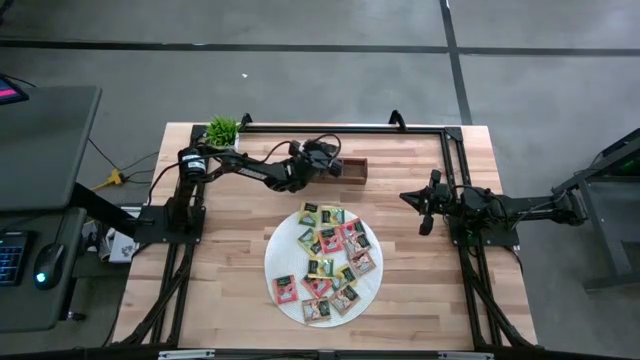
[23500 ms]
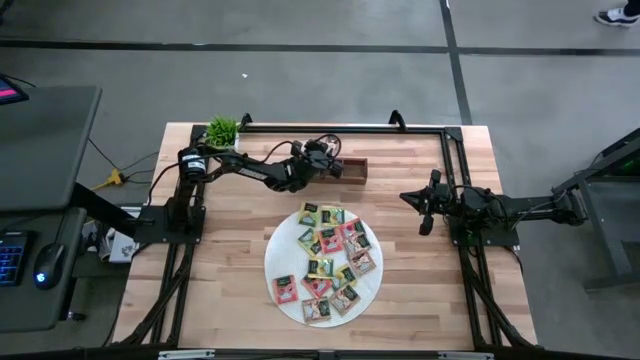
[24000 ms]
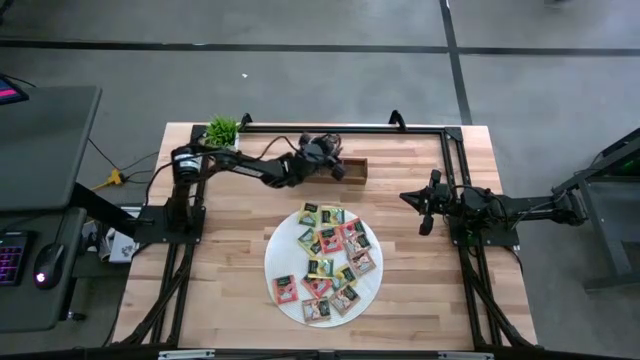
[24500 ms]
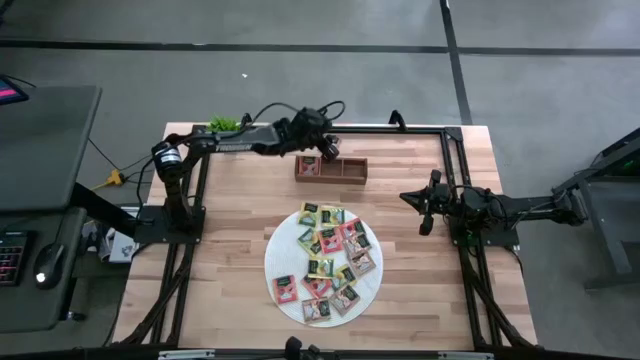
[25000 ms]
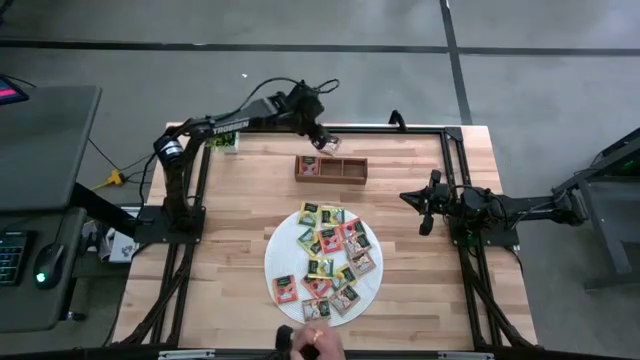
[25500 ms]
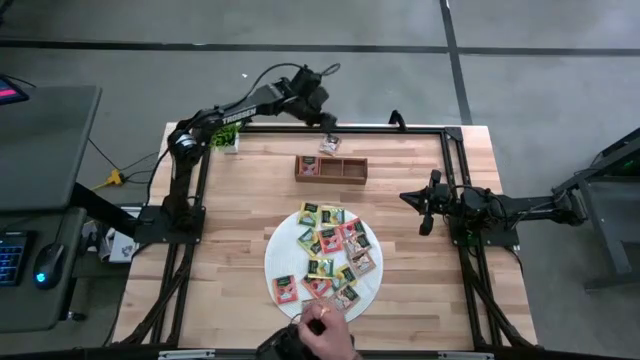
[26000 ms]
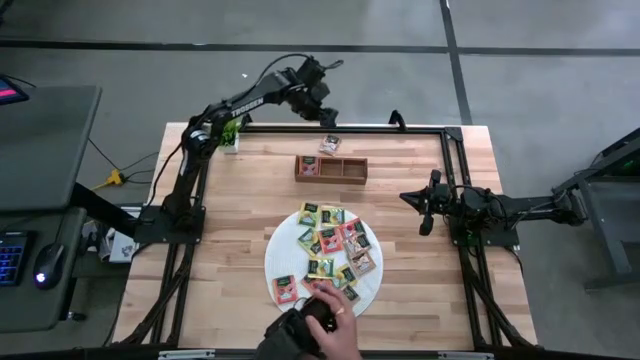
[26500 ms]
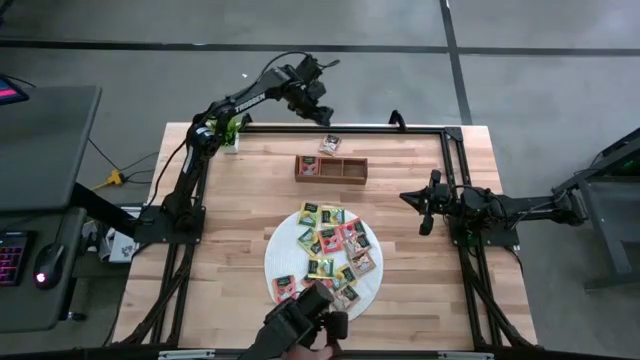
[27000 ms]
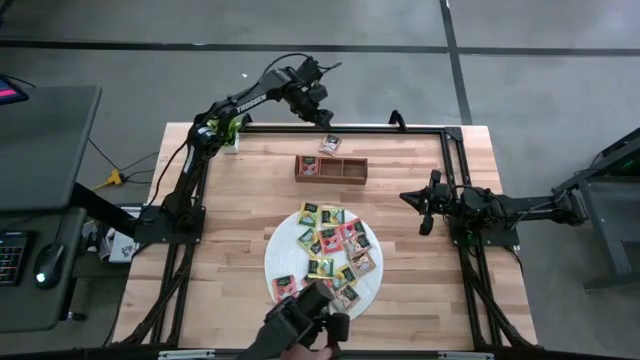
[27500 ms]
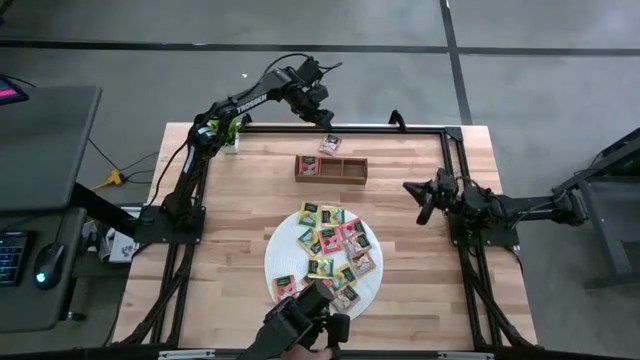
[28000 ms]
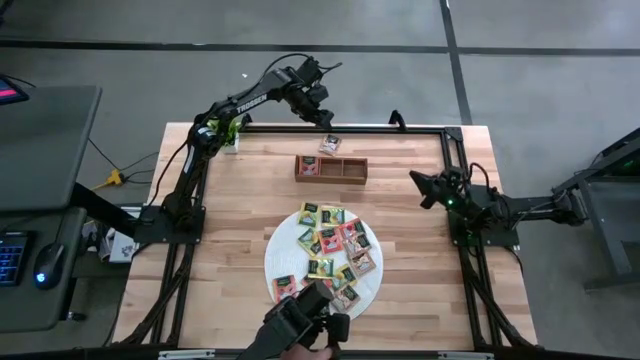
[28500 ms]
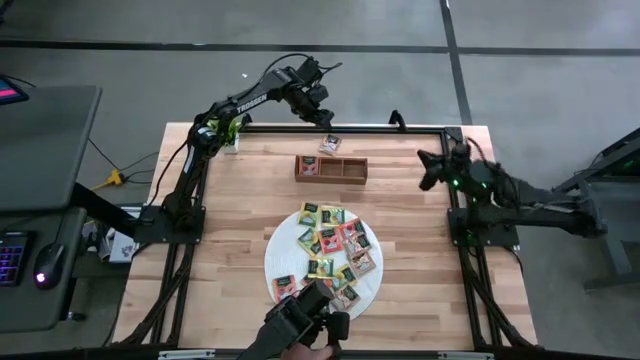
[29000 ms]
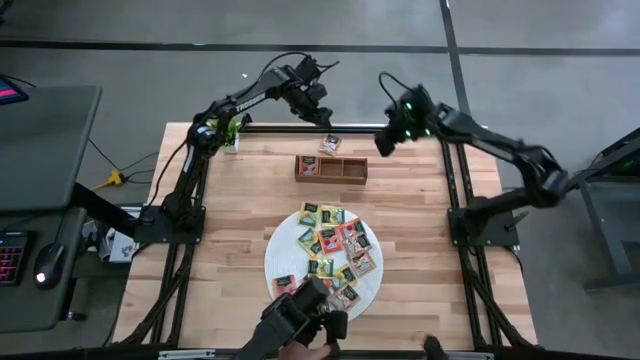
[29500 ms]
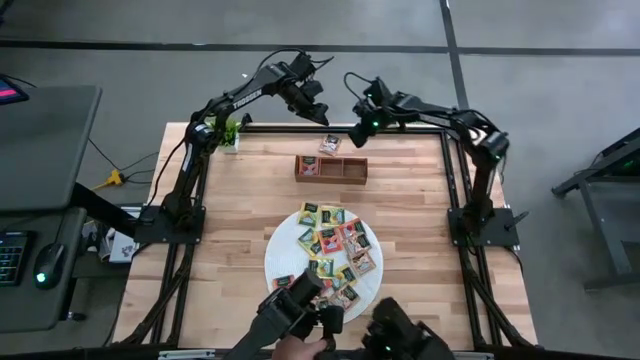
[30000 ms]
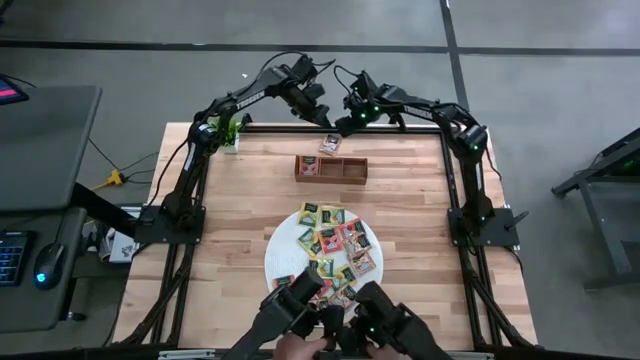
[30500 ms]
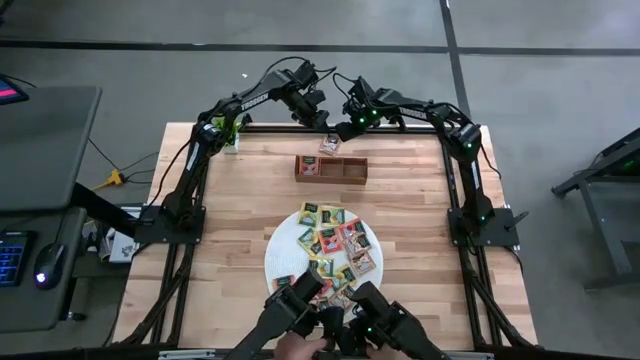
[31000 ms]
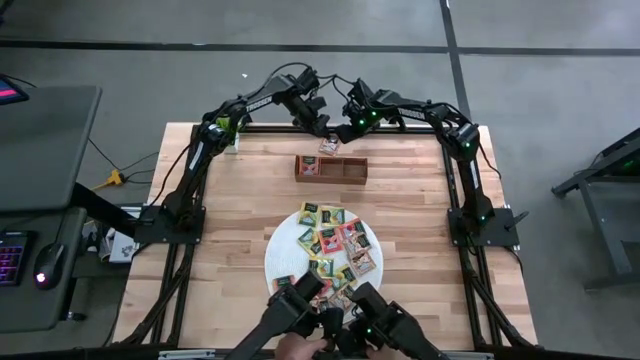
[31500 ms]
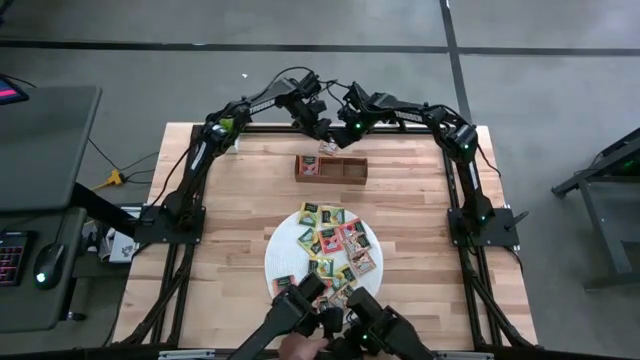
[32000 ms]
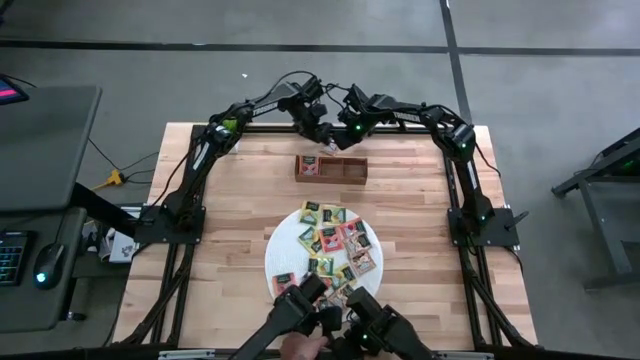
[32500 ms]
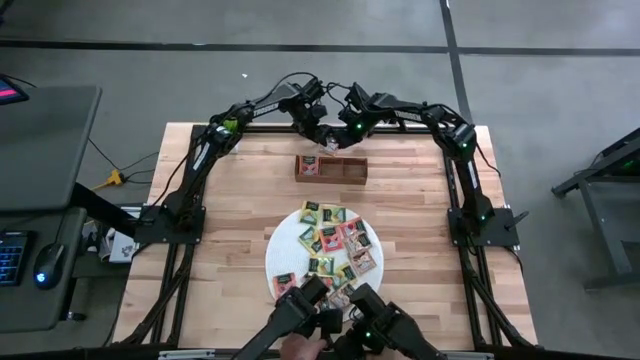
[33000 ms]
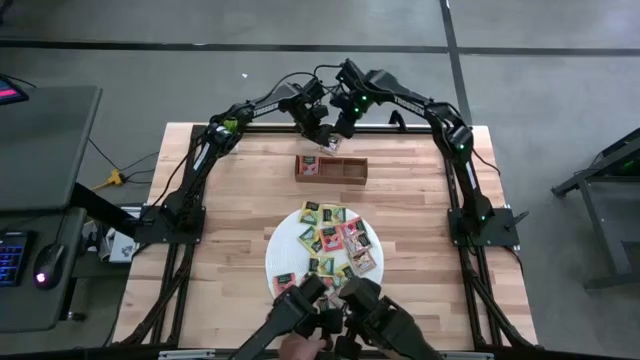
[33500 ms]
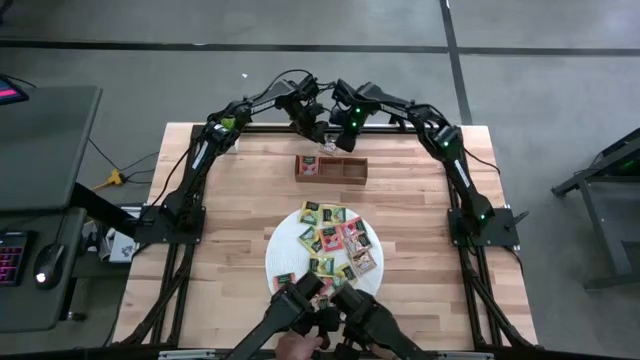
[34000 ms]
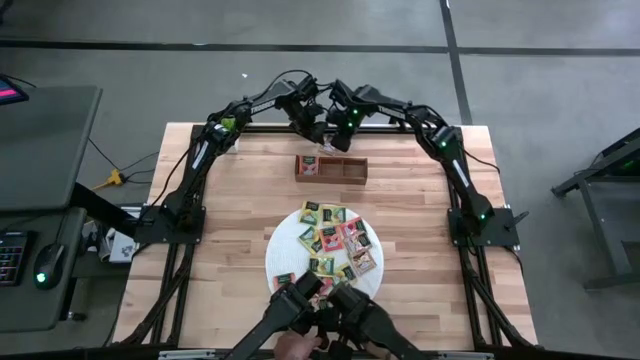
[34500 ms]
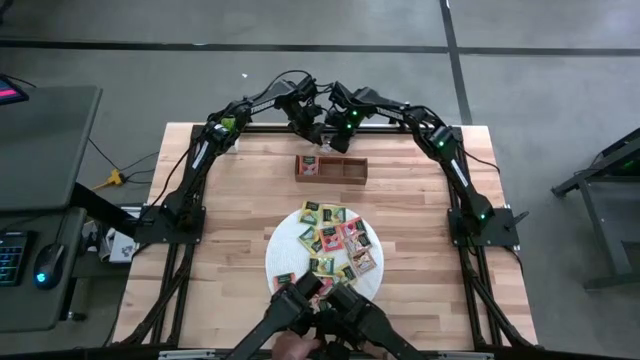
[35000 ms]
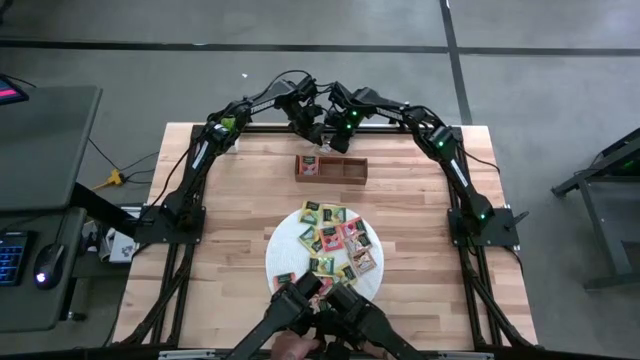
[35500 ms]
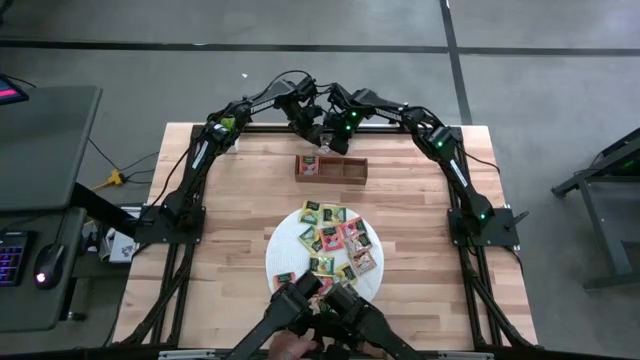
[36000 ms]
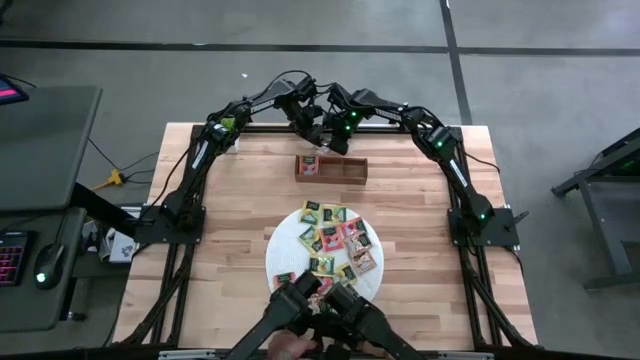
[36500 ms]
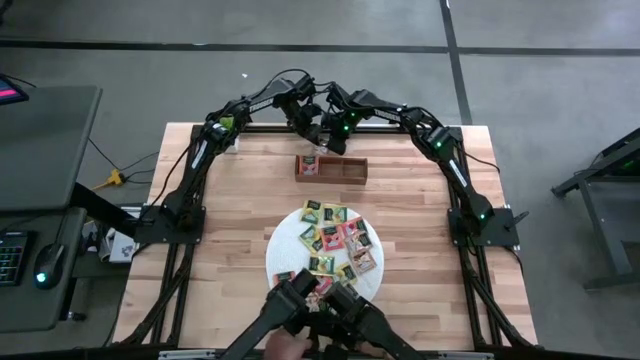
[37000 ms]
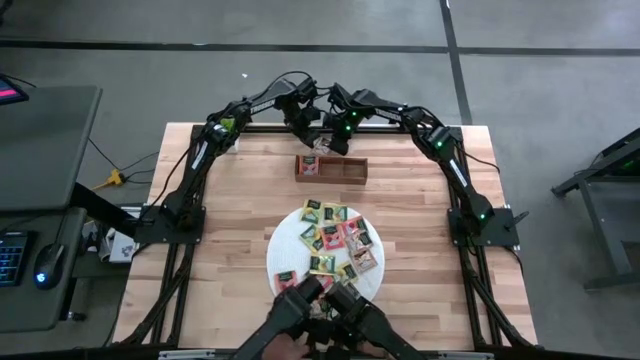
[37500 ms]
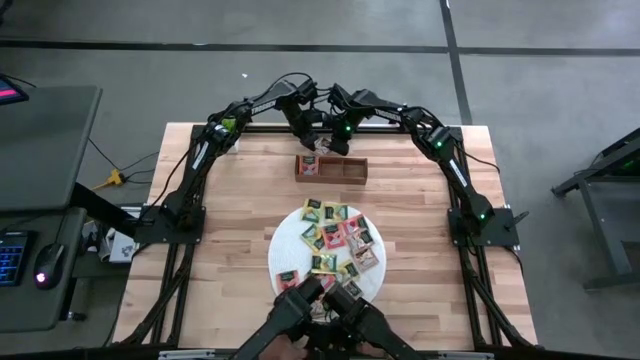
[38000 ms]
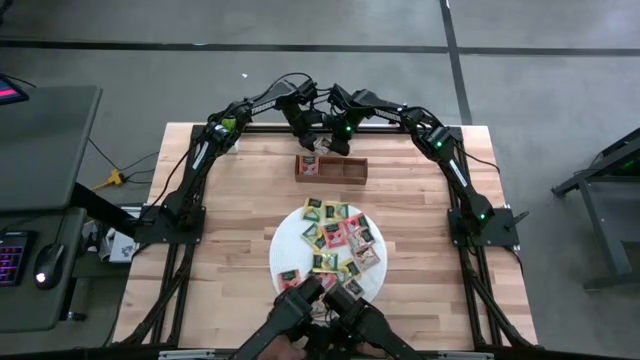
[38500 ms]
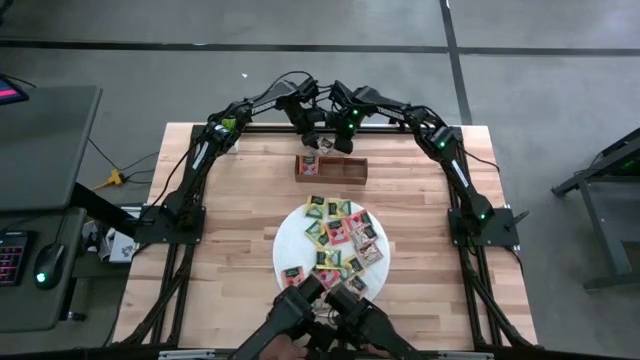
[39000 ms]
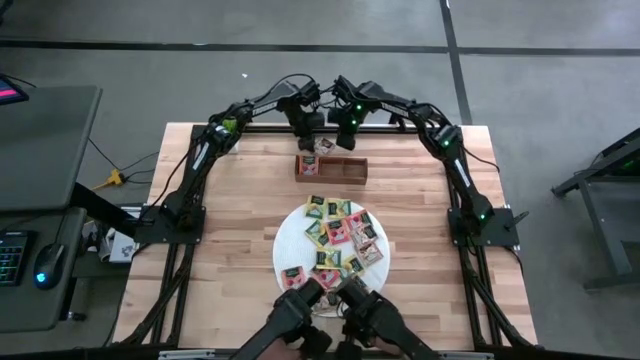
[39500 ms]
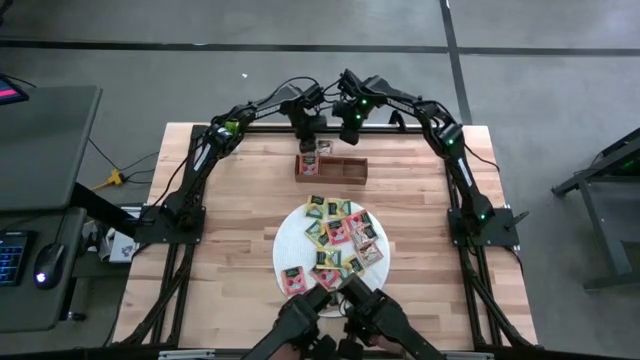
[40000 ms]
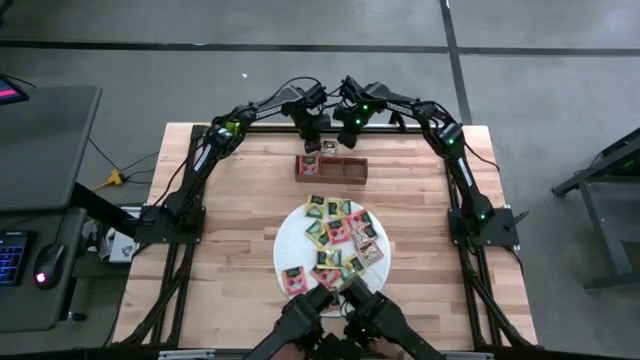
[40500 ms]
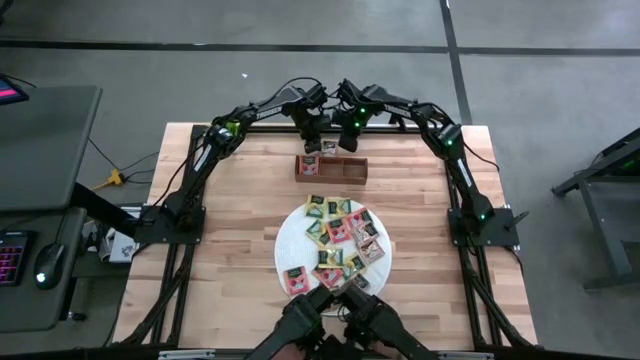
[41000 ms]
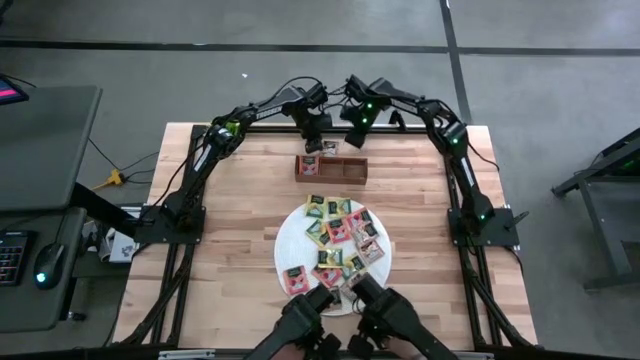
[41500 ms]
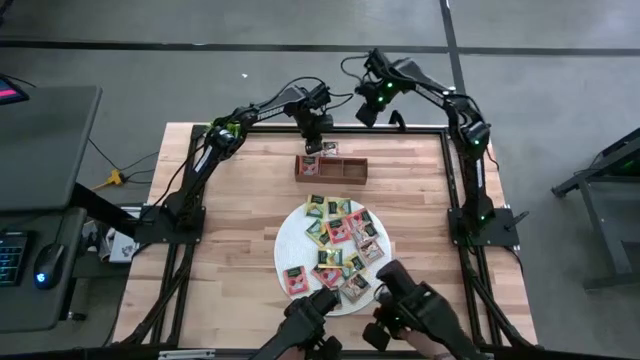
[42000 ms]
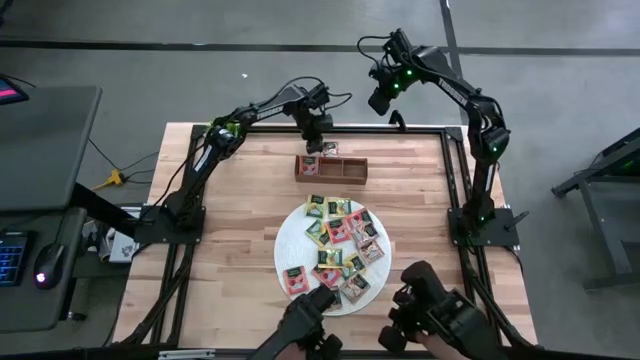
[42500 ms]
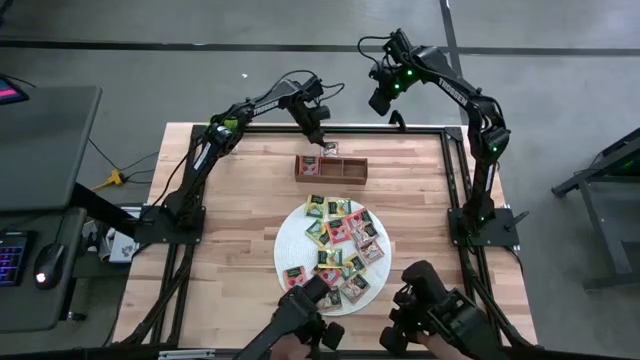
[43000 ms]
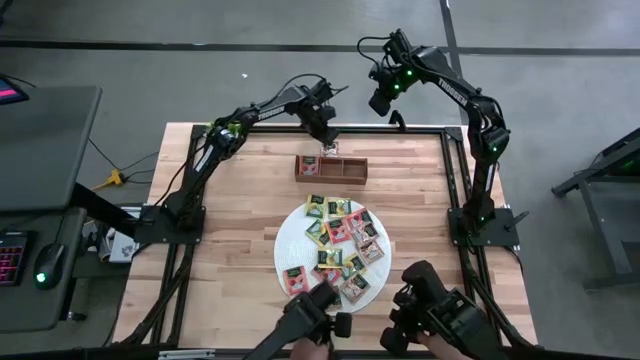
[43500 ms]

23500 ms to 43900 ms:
Task: Pick & Place Tea
Put the brown tea bag into the middle section of the wooden organizer
